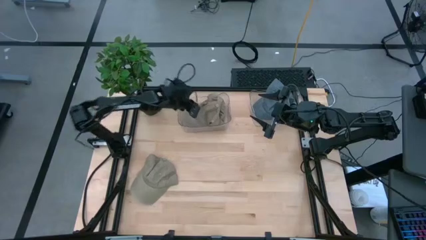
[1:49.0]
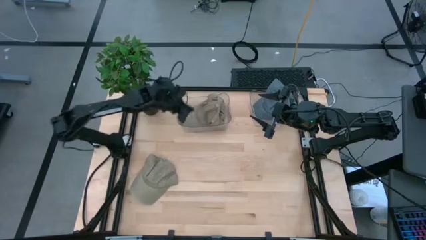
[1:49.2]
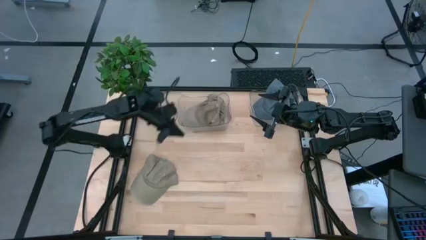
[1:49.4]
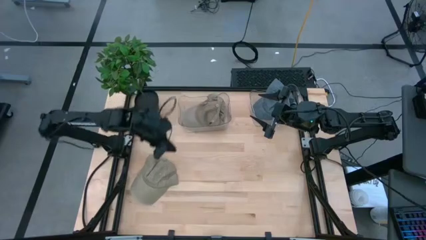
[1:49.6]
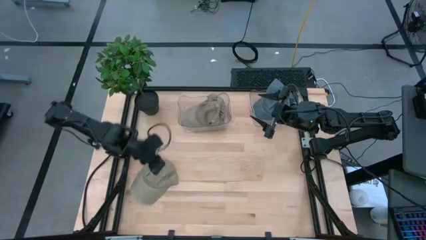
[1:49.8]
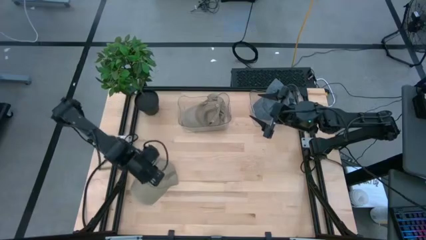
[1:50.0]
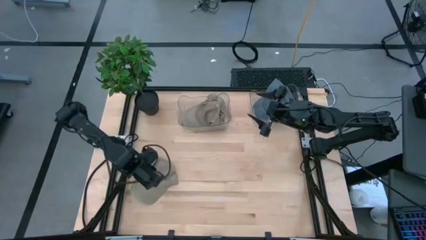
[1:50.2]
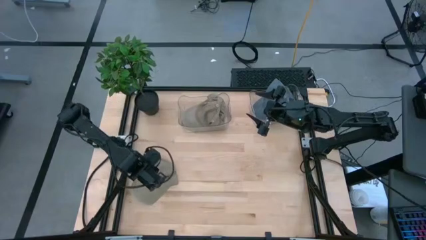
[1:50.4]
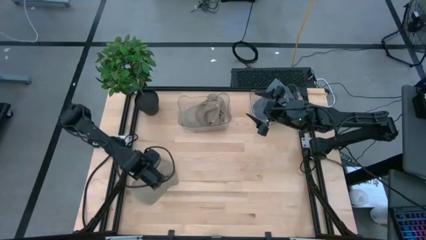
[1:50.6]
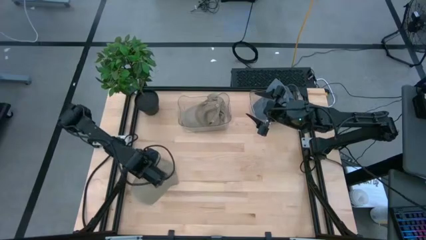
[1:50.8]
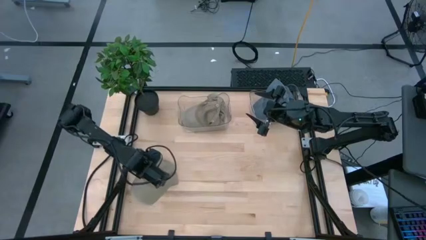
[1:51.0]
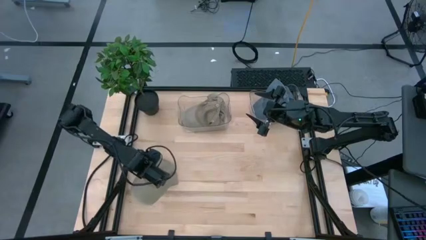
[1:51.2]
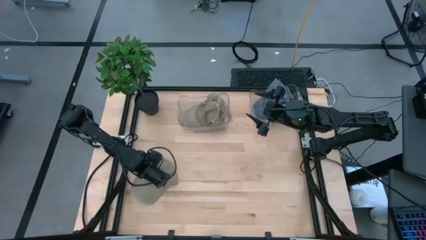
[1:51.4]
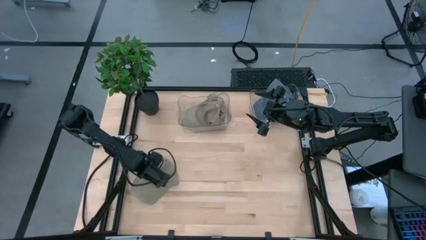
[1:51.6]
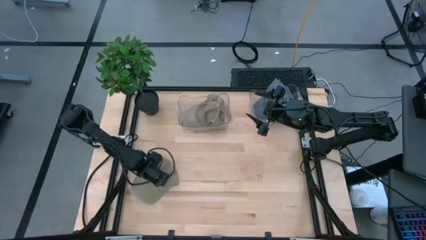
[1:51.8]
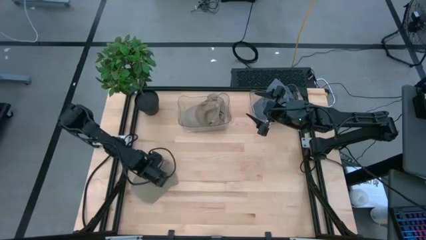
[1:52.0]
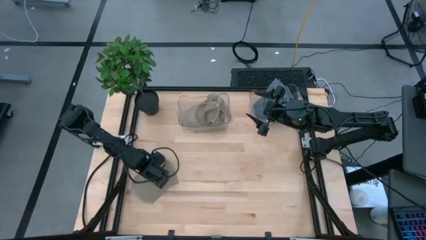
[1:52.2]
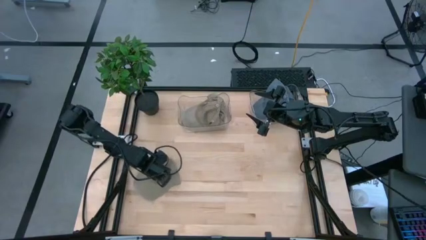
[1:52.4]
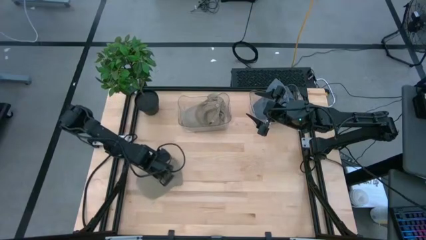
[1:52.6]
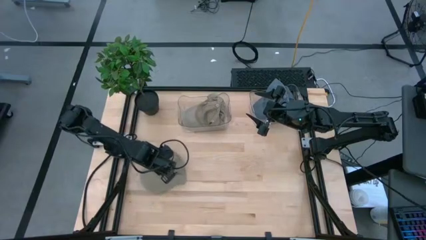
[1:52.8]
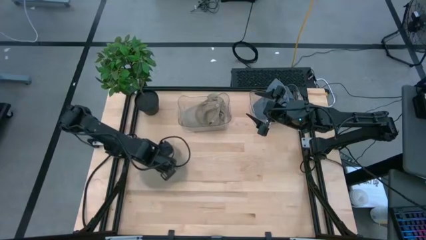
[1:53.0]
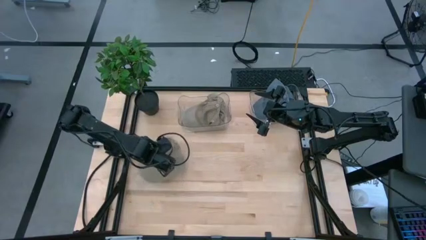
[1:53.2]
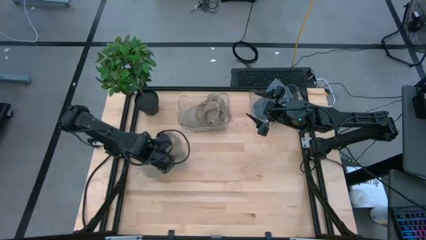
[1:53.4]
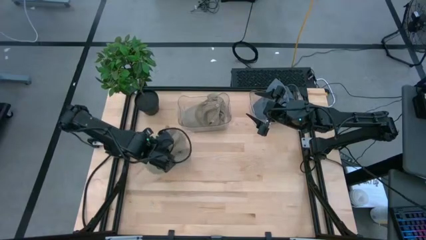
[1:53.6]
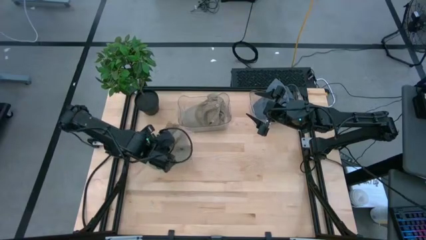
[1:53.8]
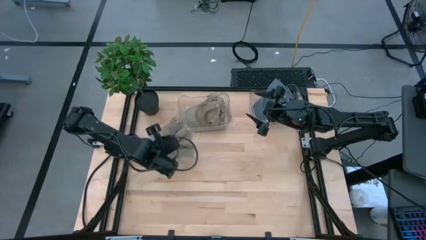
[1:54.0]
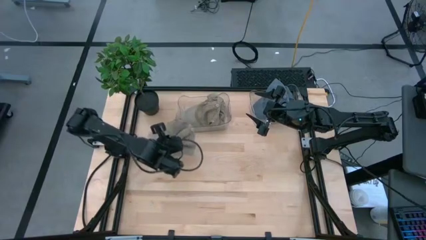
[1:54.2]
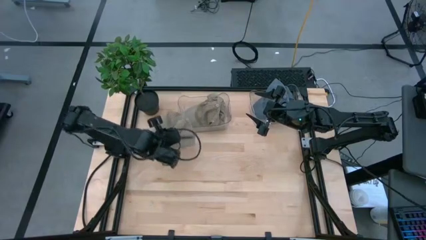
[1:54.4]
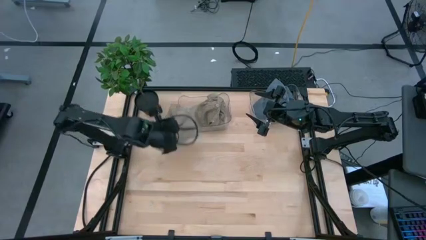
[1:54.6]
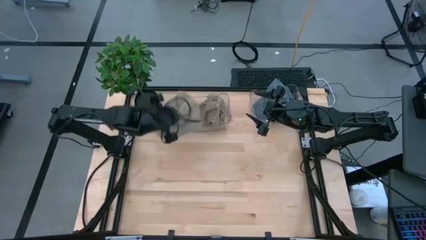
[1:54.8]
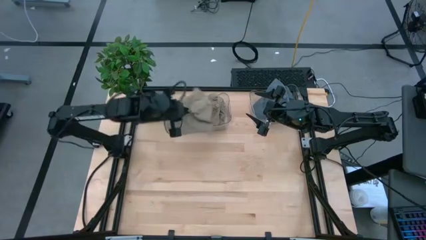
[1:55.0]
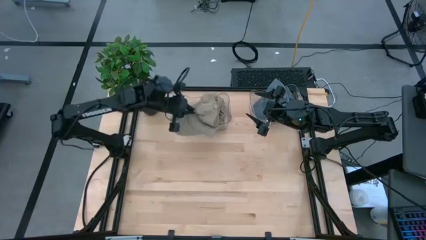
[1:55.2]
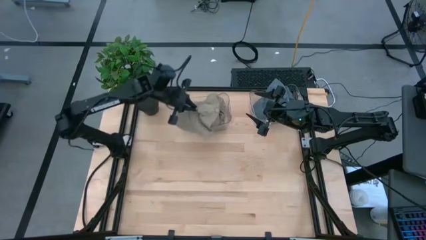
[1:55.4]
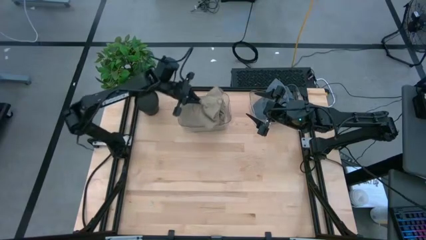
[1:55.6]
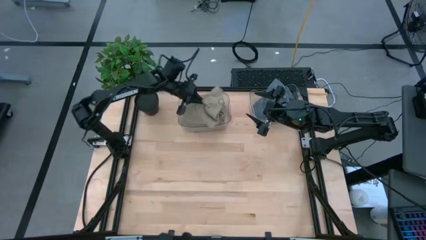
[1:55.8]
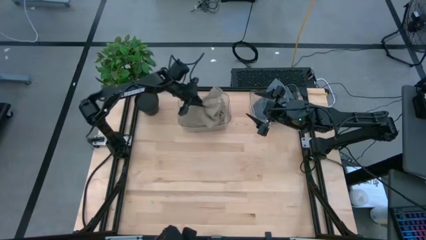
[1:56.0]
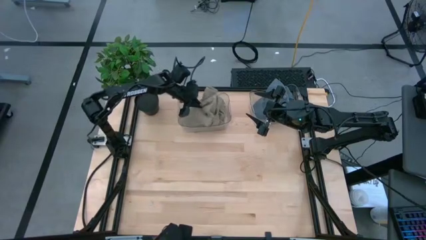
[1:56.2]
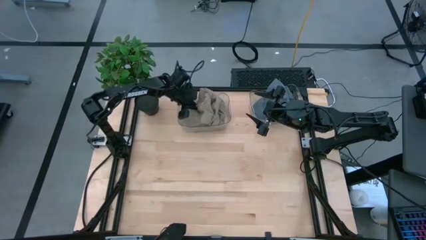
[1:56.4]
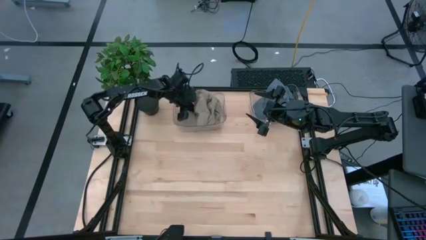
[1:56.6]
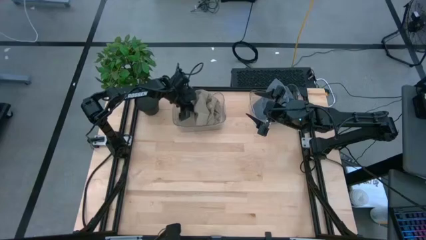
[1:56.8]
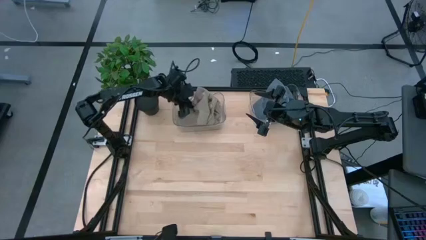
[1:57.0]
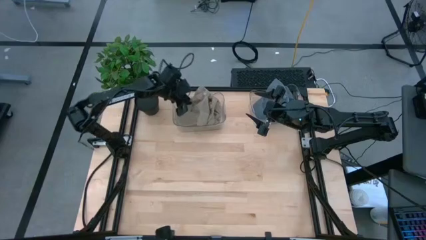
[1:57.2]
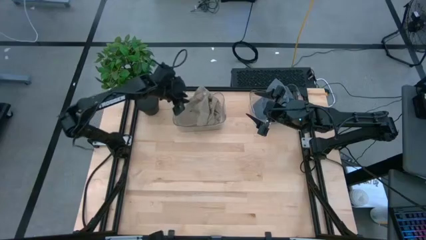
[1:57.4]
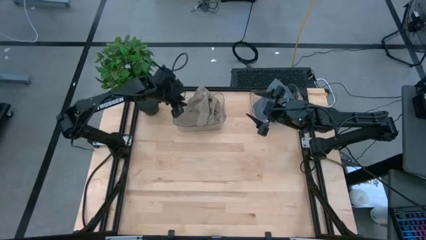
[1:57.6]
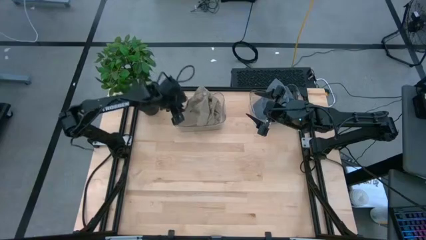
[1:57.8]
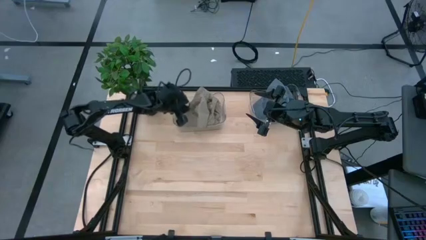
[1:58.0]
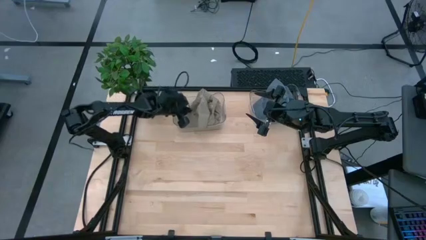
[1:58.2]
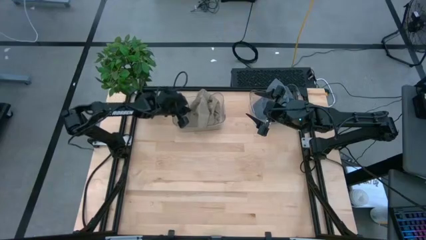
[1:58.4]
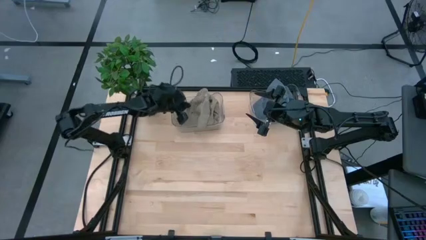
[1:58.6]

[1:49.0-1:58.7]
Task: Pick & Place hat
Put the brown cap into the left transparent bin

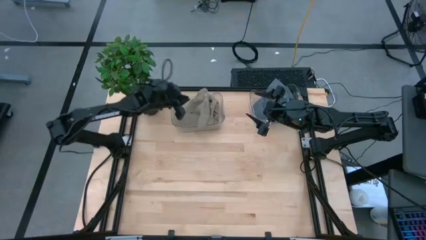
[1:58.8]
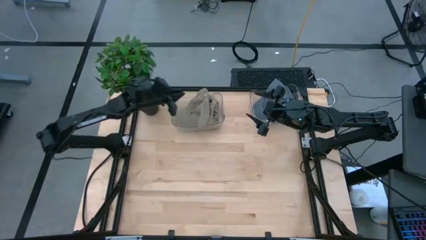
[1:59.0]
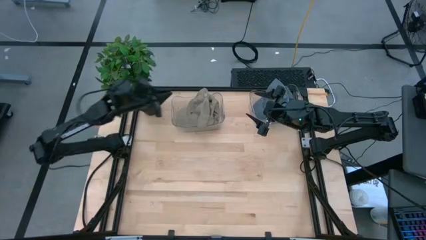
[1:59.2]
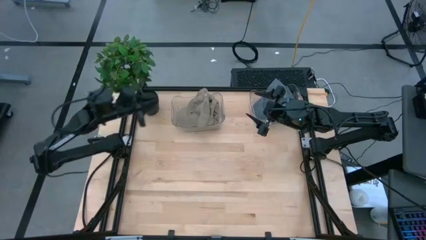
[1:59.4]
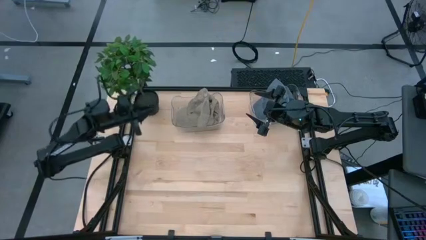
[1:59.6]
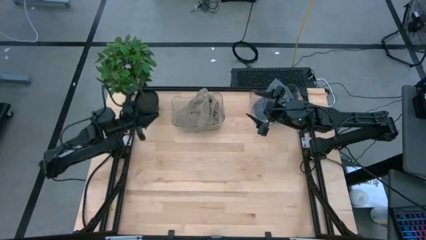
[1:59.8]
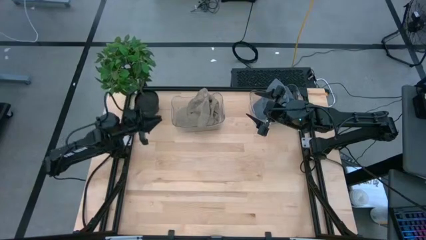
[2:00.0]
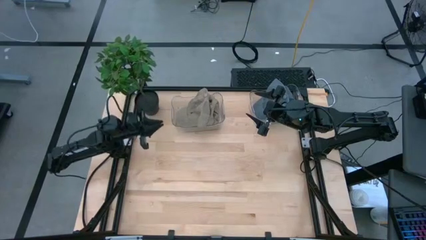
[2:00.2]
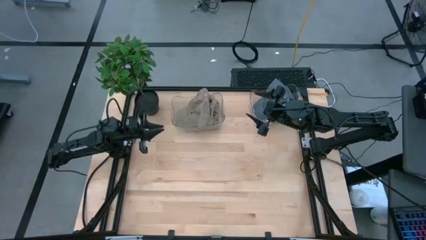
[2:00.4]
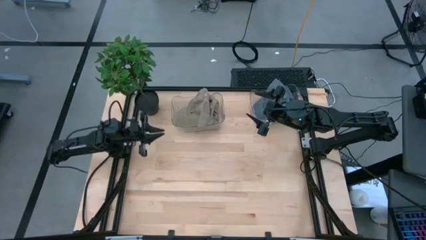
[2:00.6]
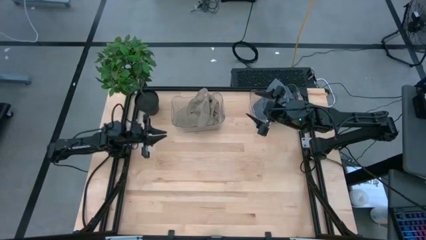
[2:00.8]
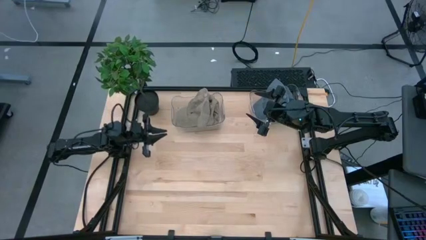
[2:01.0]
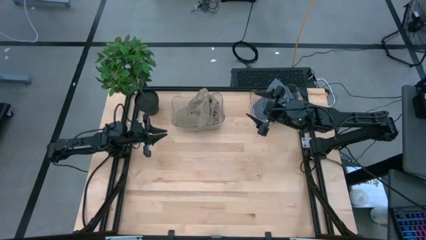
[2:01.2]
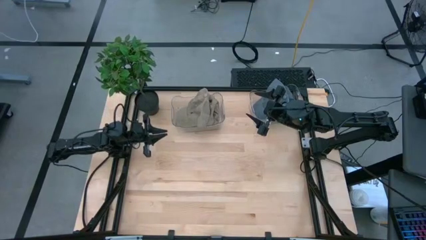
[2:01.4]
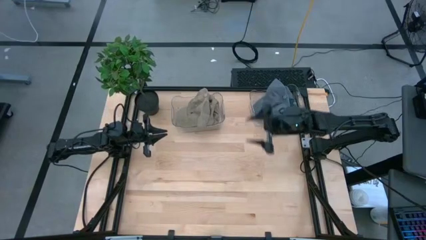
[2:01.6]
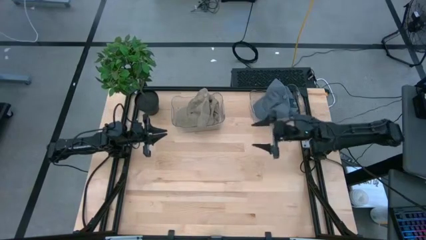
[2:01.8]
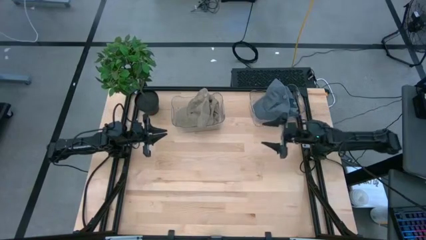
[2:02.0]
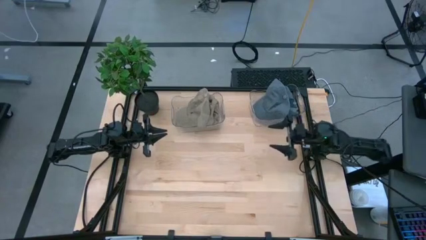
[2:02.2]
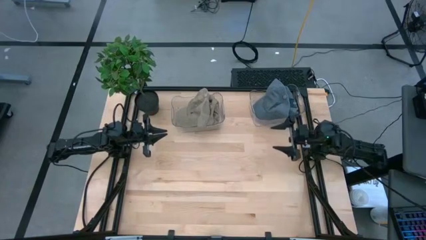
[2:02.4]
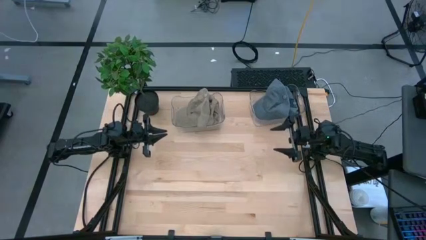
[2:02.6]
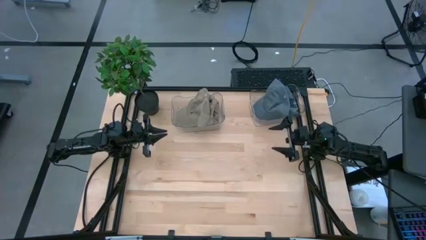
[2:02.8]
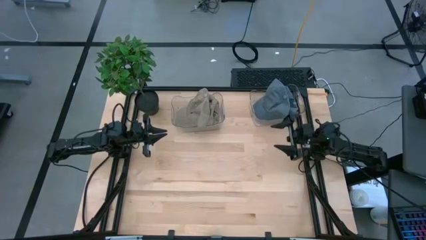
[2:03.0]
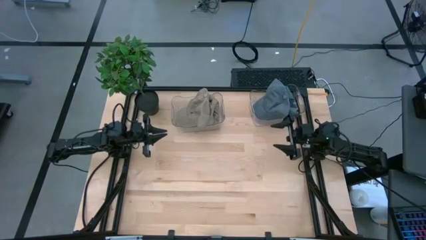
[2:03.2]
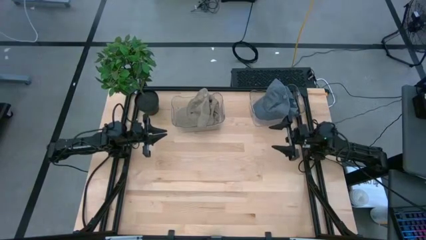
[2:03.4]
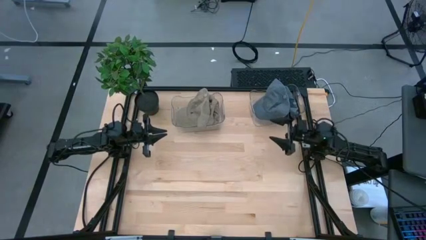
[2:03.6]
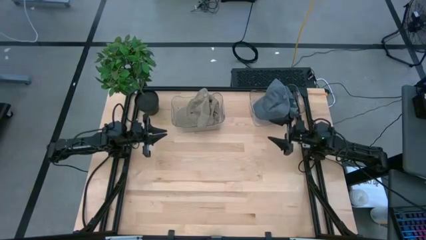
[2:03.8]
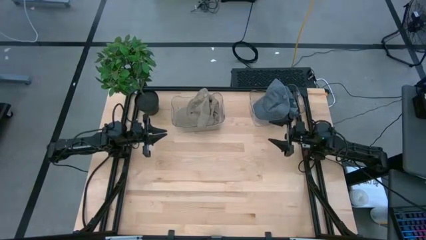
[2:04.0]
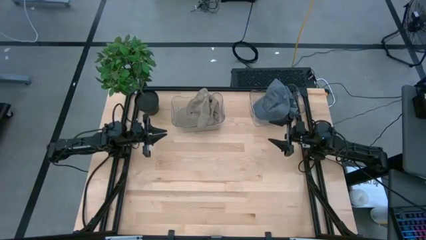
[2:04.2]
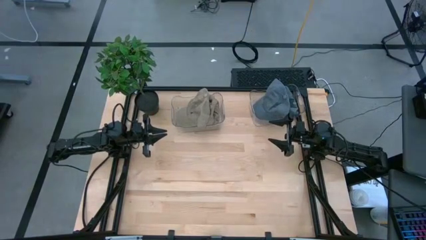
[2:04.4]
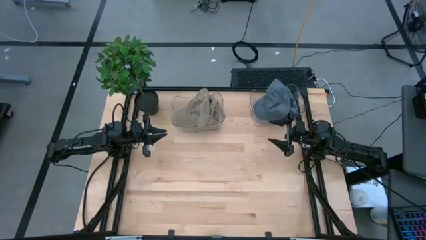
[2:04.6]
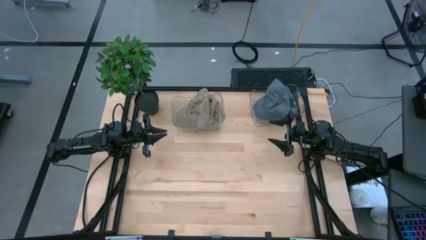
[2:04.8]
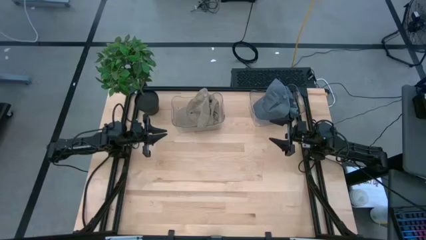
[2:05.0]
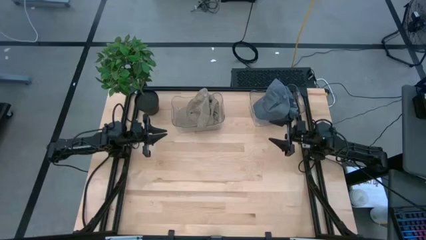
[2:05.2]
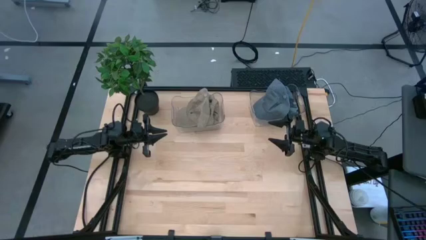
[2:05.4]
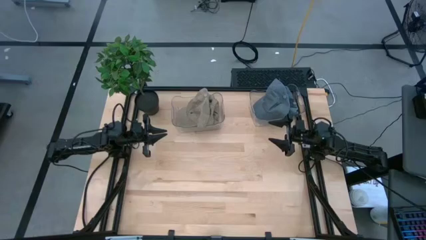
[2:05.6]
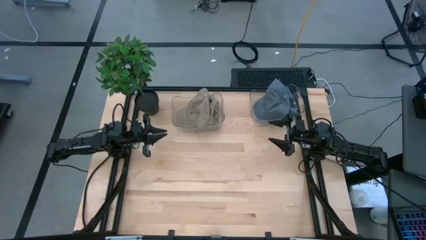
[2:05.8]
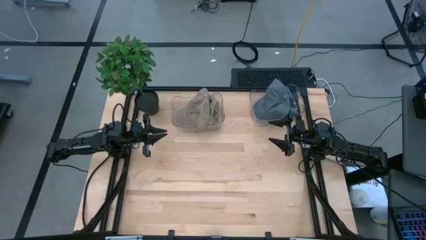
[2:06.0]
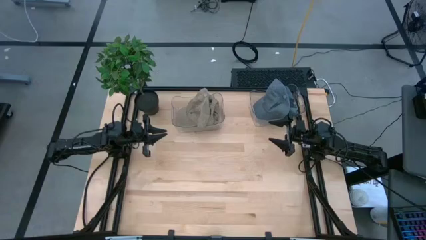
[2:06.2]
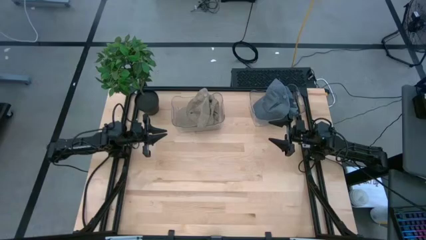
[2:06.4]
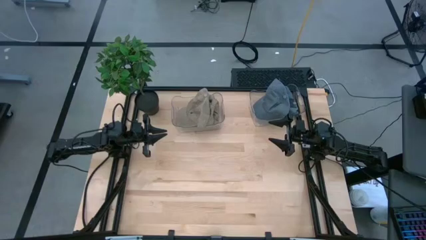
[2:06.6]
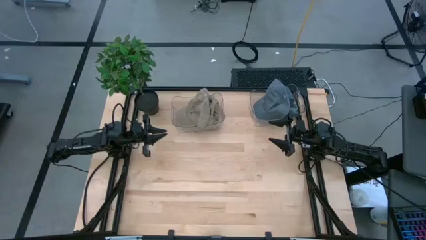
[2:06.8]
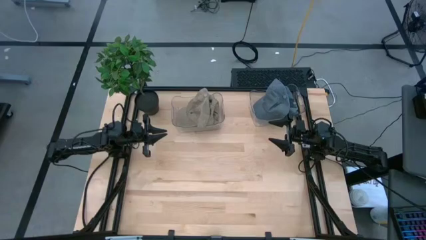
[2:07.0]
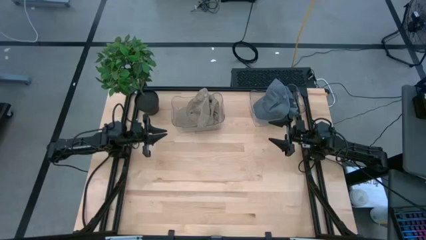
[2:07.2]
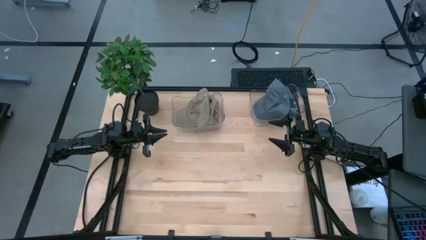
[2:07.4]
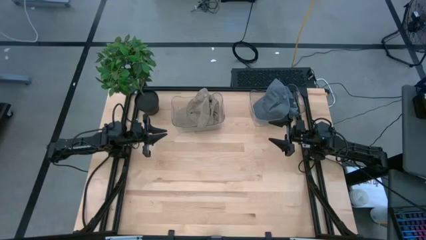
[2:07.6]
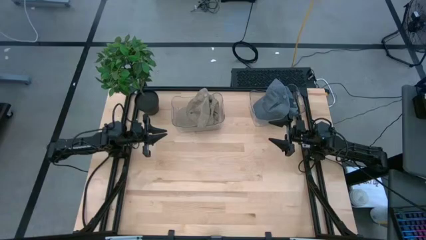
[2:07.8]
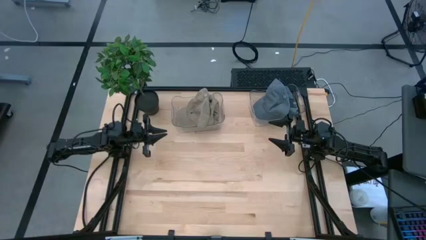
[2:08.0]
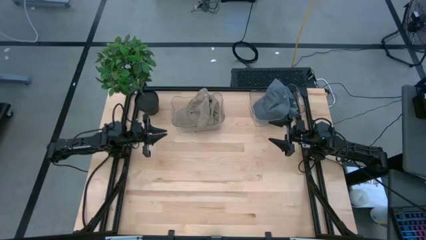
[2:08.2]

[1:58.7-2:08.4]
Return to Home Position
